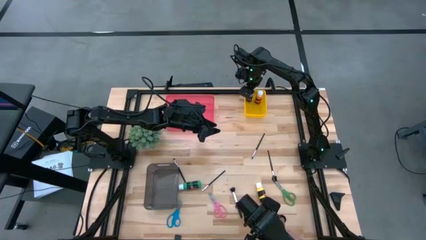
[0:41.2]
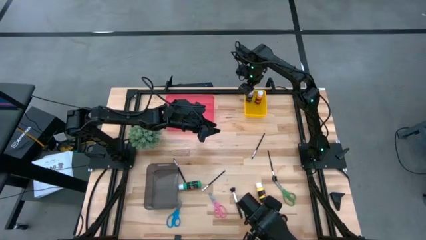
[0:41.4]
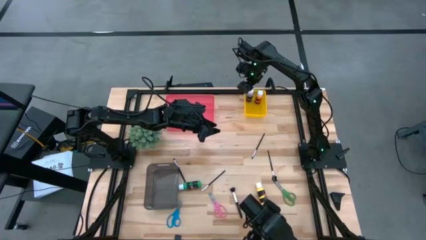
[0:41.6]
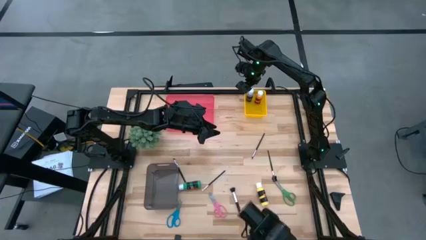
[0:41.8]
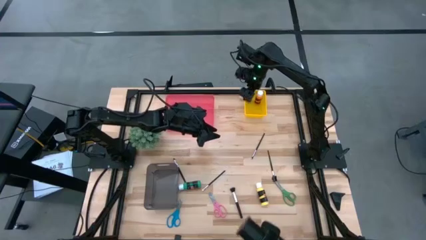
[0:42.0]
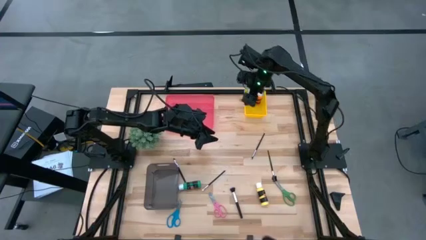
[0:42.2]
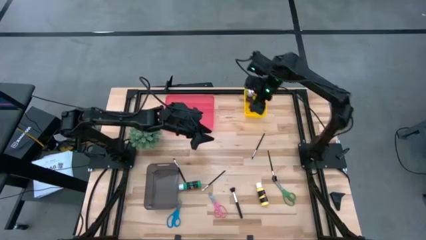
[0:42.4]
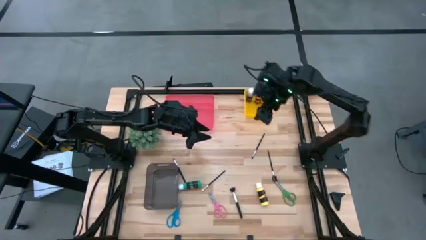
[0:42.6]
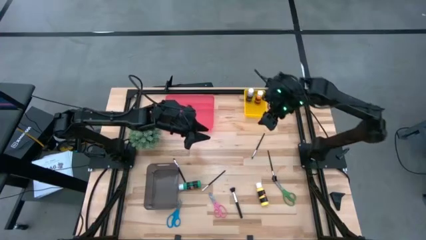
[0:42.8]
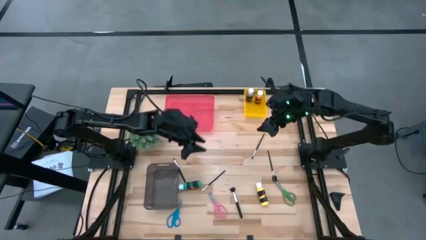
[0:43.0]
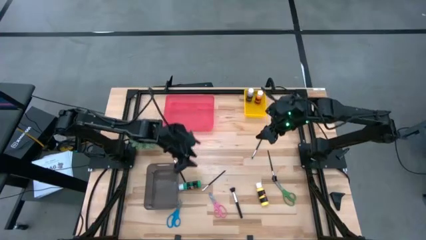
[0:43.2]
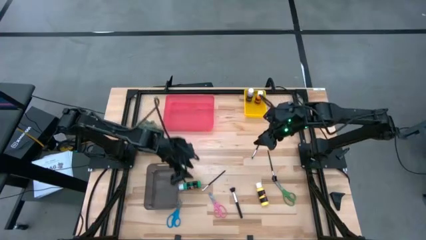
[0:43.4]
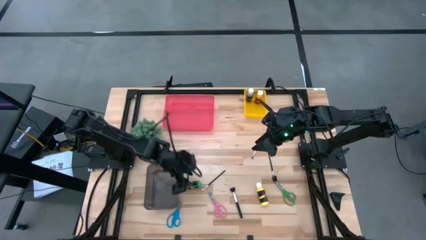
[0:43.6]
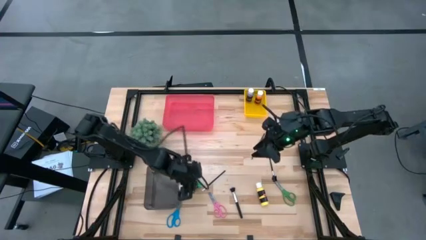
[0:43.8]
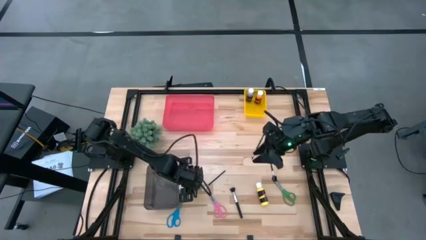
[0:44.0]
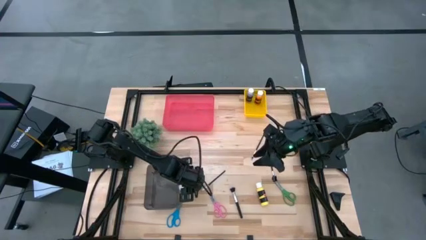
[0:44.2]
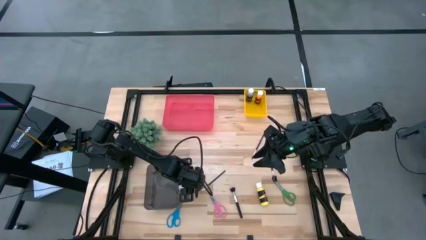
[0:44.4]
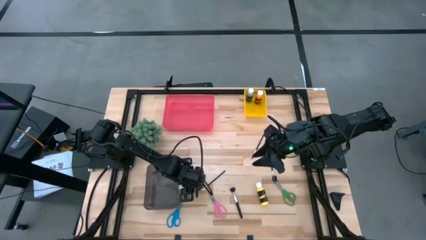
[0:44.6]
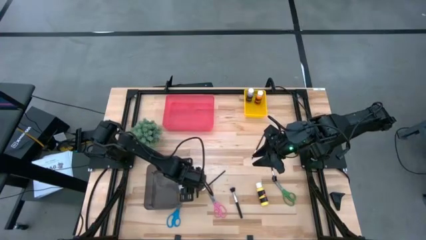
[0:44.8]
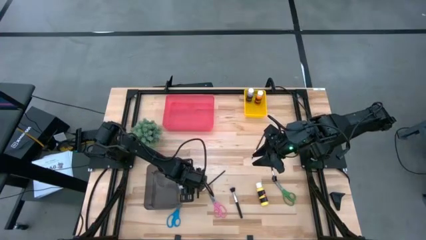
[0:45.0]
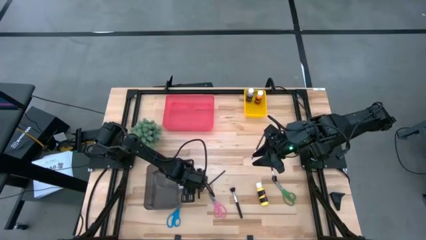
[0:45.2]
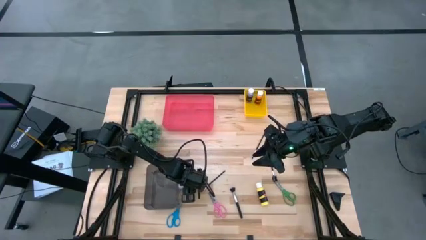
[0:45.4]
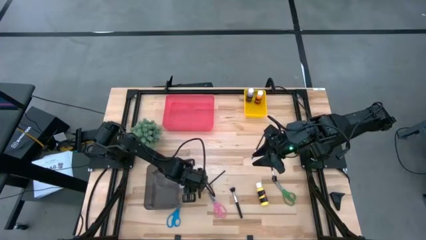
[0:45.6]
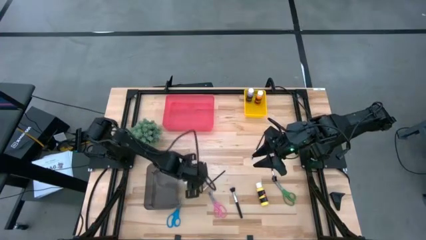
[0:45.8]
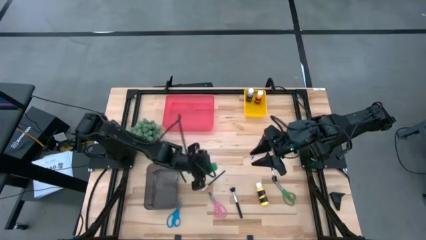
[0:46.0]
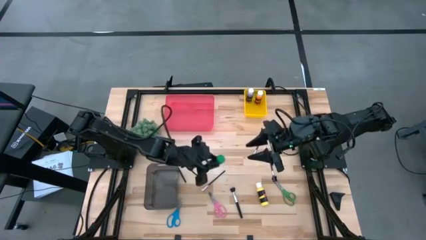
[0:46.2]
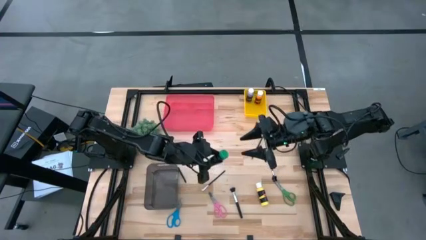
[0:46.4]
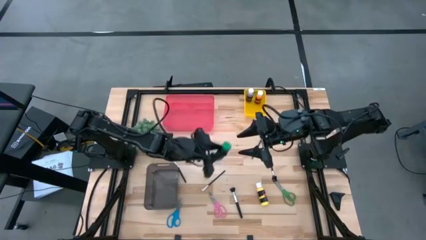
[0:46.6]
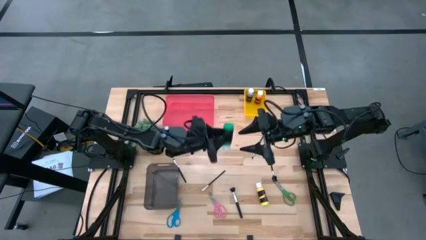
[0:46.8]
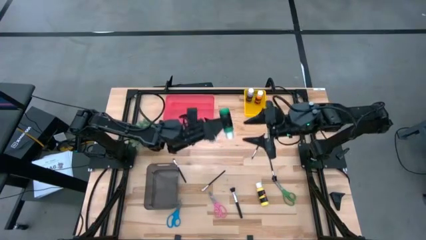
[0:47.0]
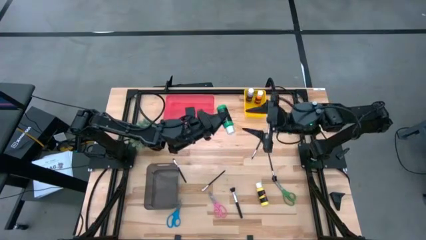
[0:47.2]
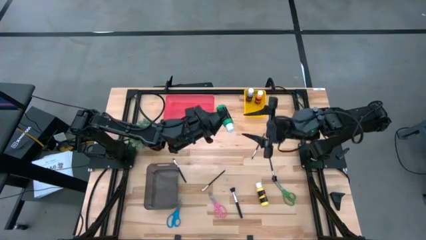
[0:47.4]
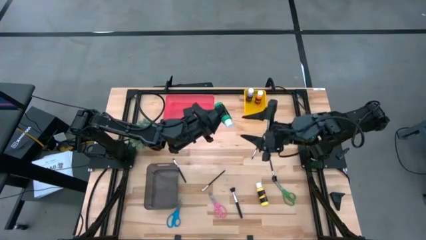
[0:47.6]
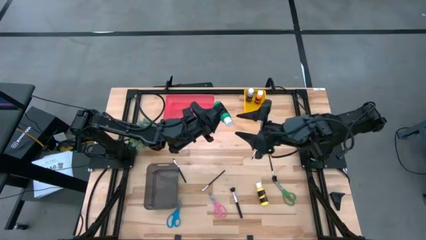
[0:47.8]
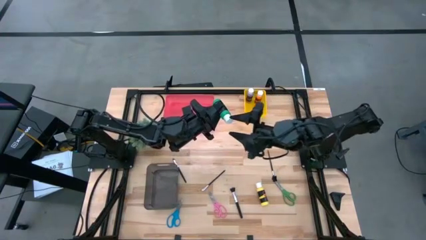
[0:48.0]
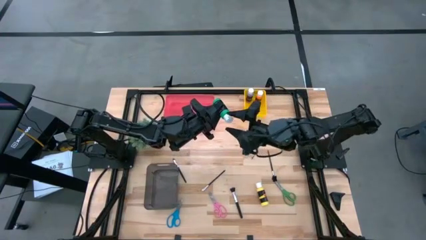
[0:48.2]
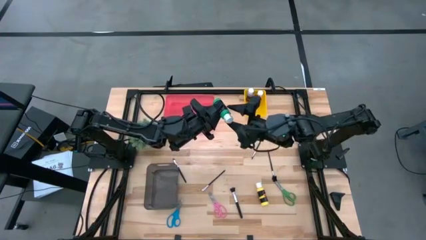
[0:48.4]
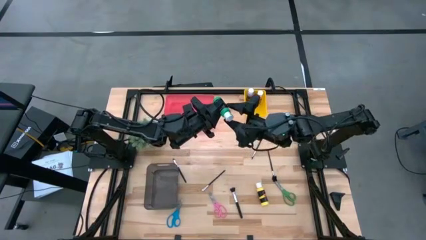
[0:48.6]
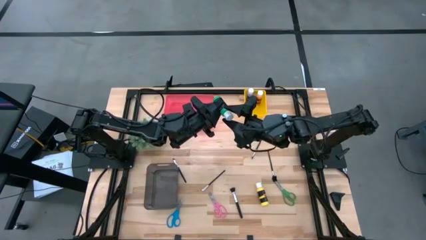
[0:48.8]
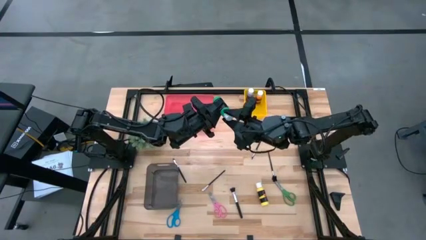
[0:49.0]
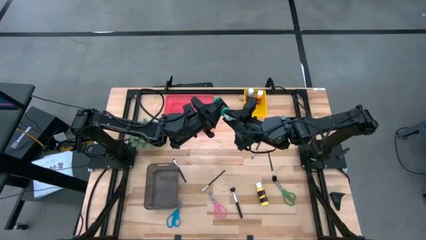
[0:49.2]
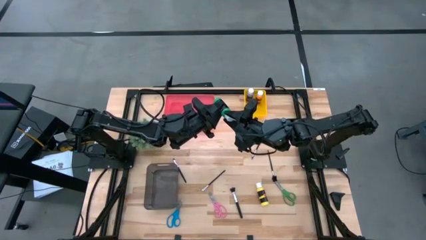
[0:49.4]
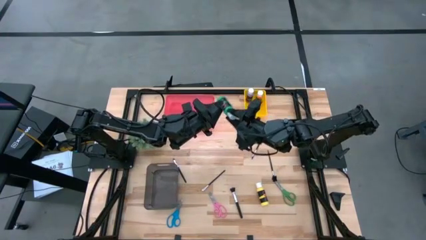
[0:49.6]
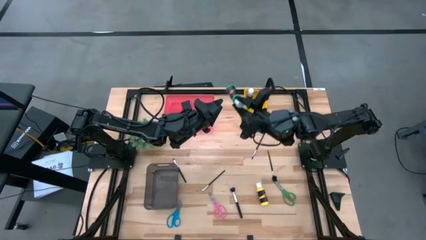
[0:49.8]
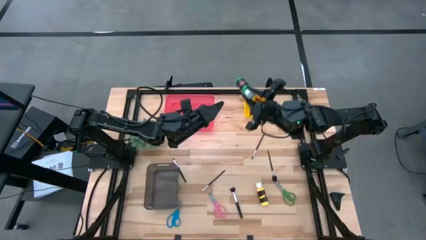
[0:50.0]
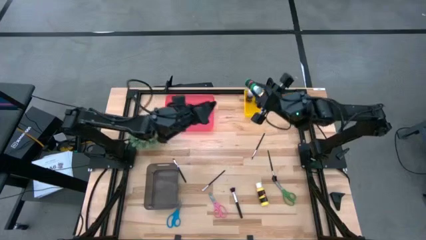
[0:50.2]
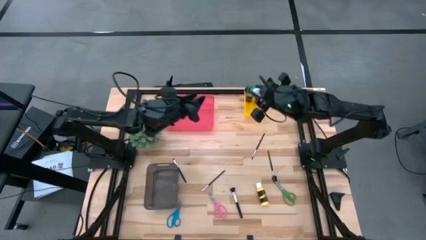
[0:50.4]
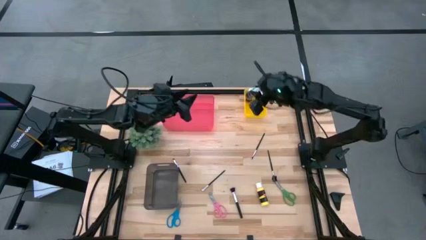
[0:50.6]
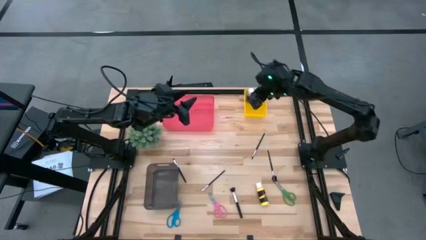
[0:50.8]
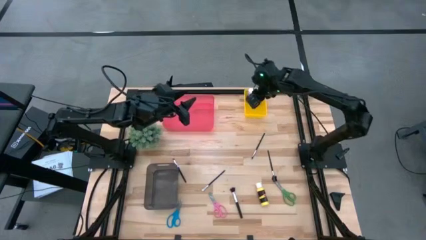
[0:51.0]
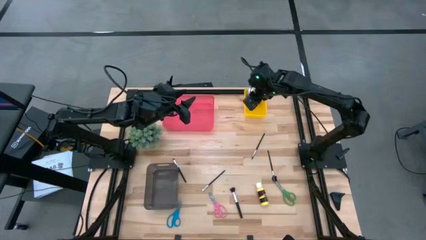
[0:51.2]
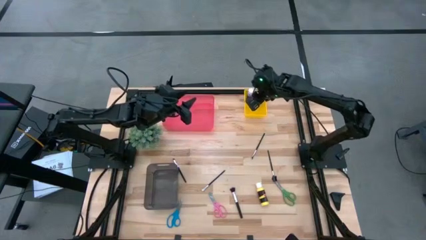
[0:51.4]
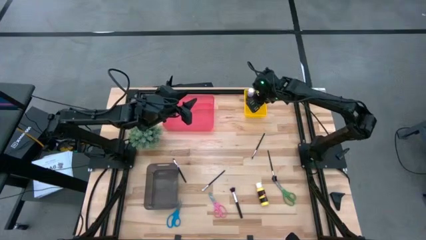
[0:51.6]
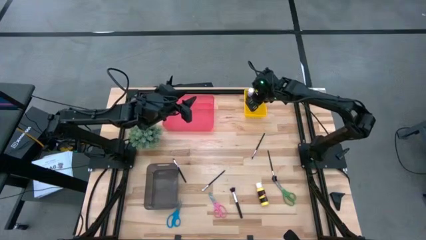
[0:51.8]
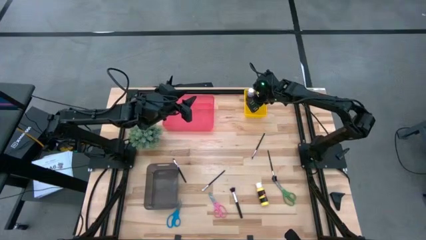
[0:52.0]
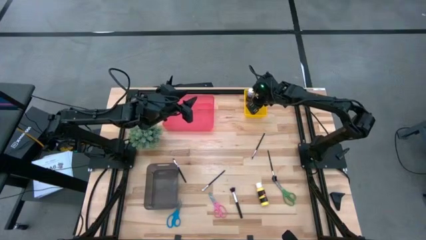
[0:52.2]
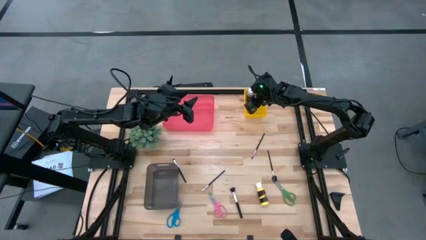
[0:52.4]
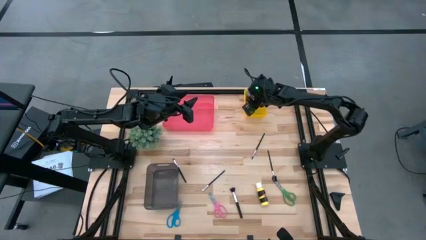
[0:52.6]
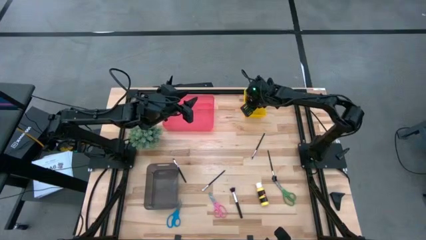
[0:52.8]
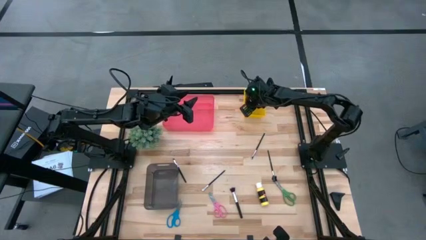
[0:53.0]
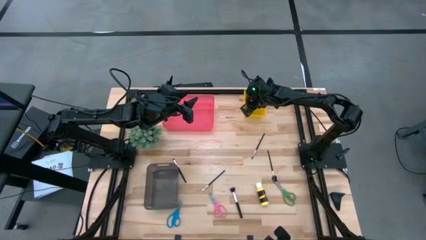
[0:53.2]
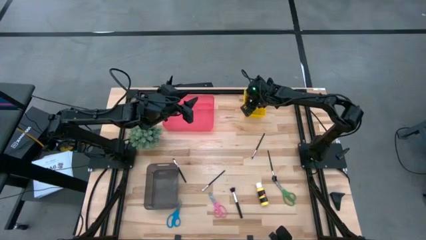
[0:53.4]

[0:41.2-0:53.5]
Task: Pick & Place Paint Supplies
Put the green paint bottle into the yellow bin

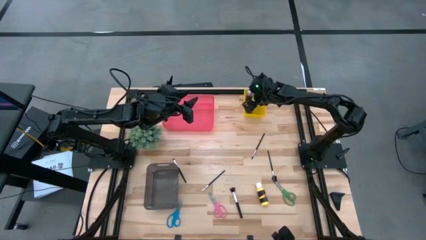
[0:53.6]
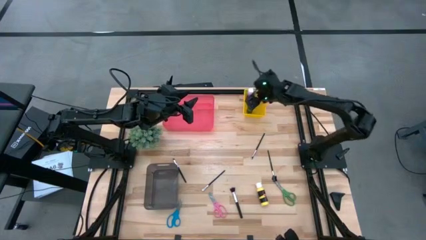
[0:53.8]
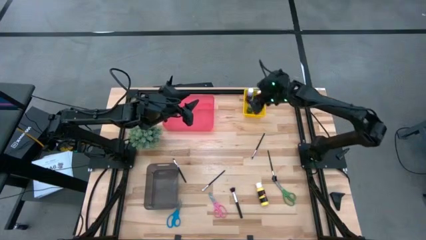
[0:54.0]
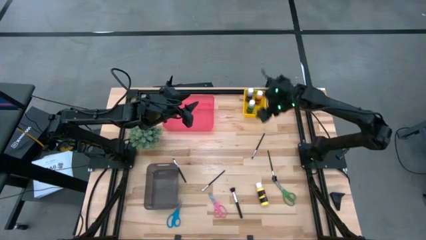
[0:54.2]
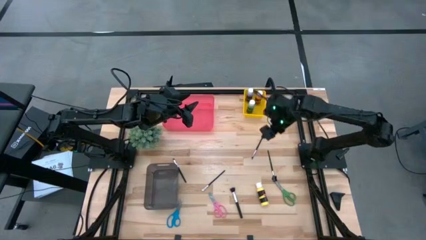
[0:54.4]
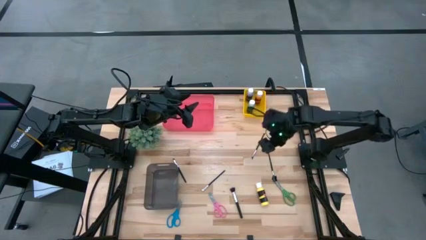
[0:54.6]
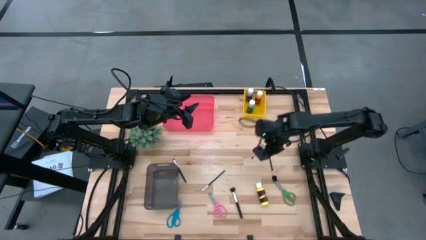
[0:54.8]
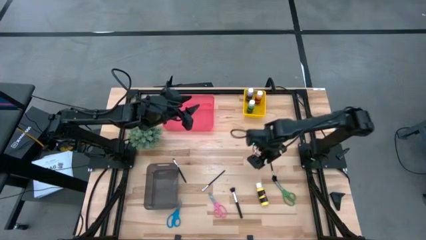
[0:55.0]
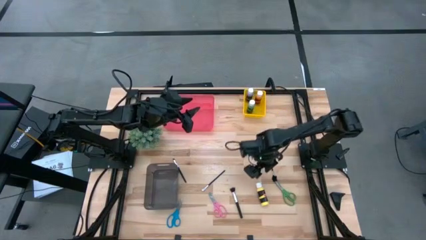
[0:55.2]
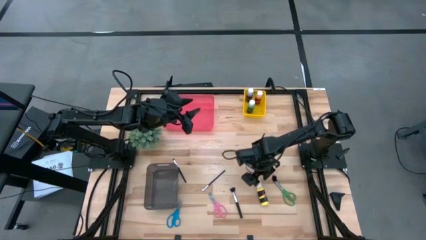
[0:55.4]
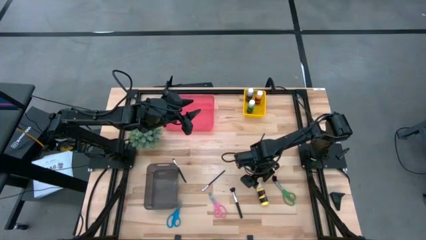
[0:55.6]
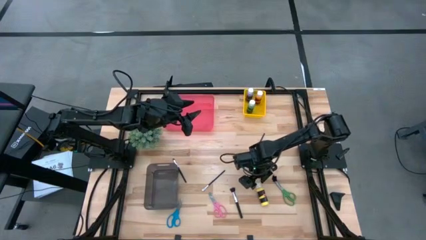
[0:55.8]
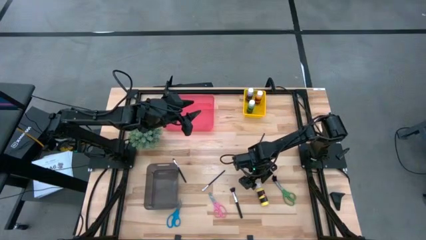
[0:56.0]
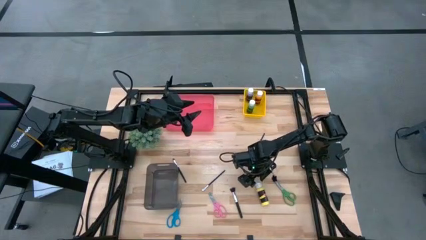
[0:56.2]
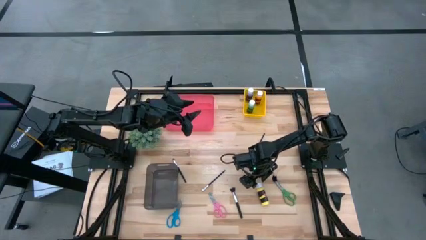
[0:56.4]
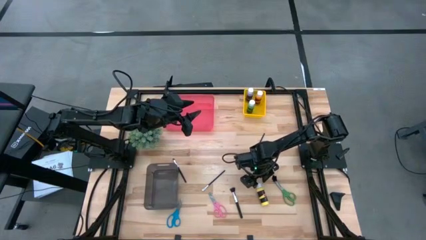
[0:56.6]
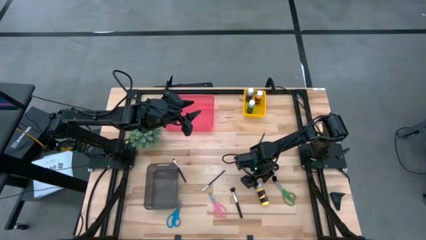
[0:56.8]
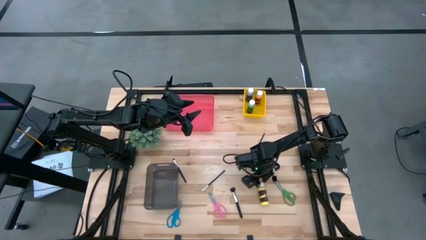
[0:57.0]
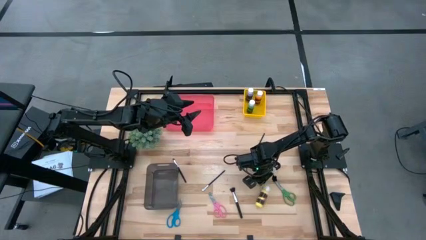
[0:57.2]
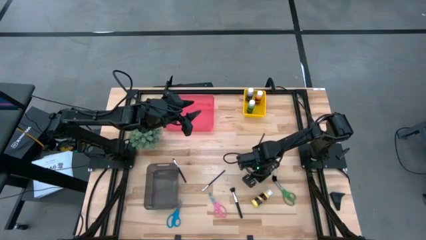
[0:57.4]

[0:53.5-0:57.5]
Put the yellow paint bottle into the yellow bin

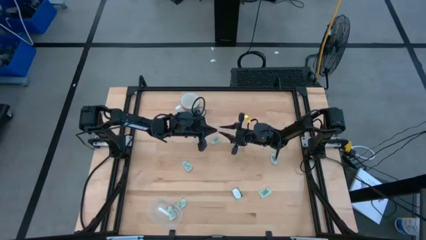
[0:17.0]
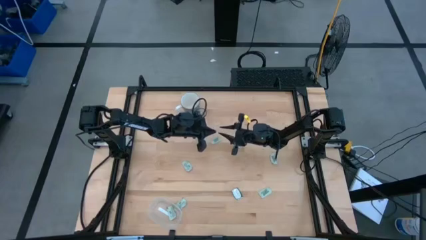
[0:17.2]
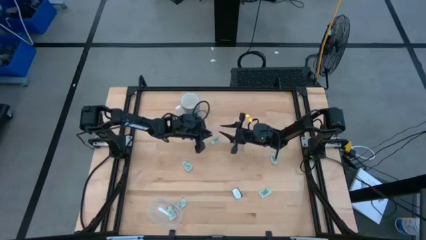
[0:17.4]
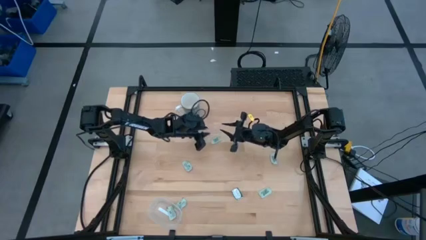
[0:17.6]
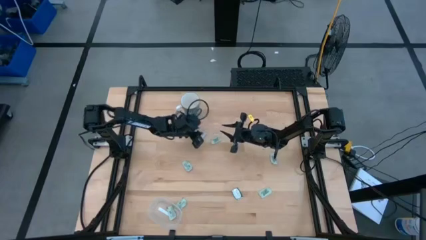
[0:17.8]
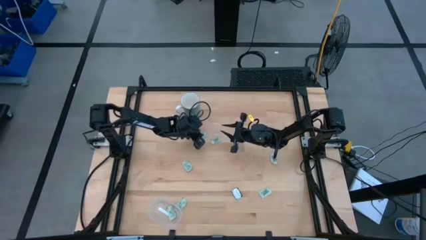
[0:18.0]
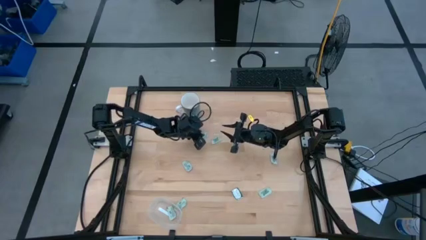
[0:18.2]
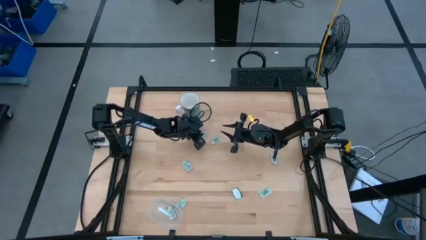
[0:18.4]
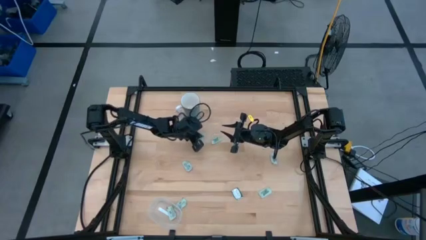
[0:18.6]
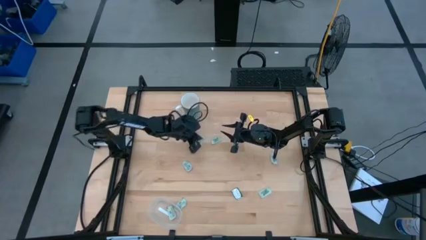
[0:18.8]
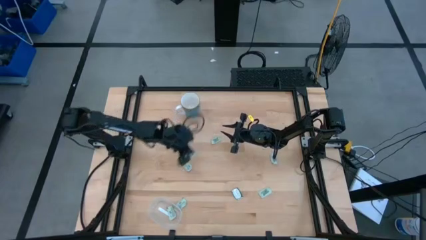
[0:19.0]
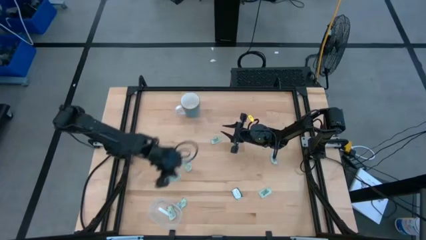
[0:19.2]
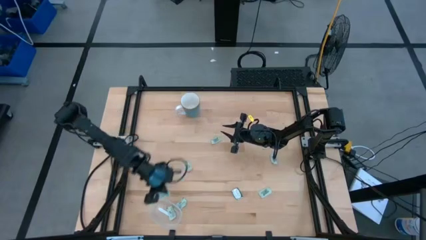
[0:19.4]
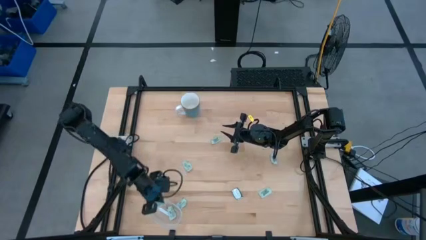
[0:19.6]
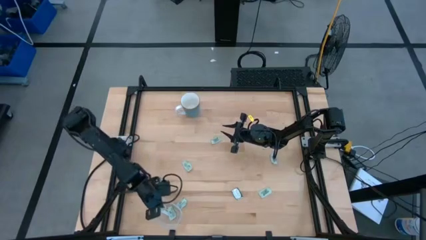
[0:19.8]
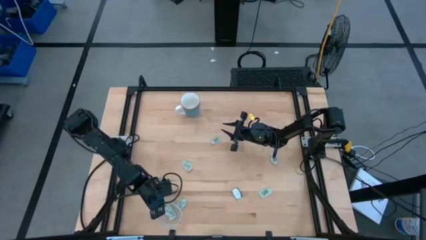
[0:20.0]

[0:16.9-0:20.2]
Task: Pick and place Stevia / Truvia into bins
Put the stevia packet into the transparent container
